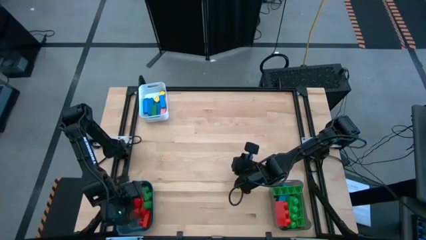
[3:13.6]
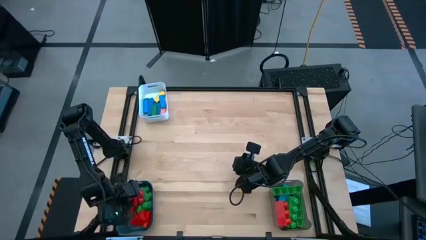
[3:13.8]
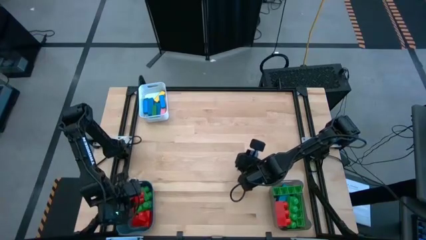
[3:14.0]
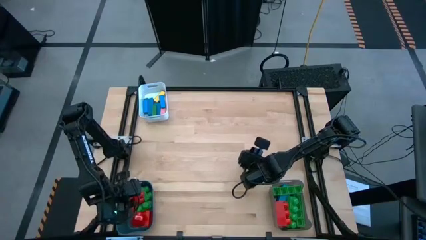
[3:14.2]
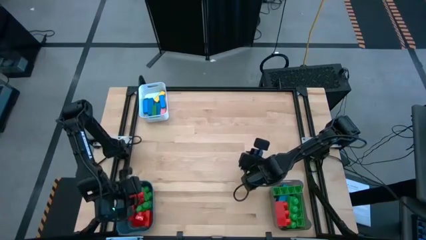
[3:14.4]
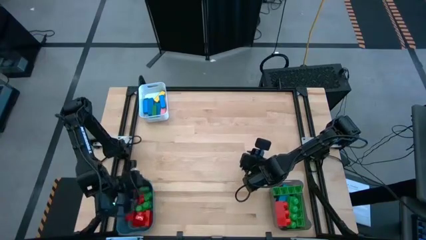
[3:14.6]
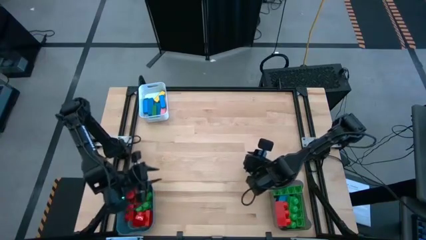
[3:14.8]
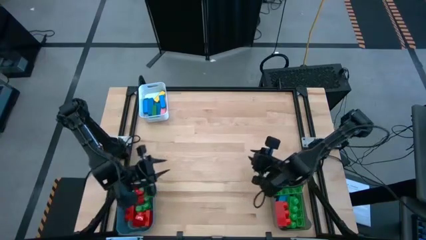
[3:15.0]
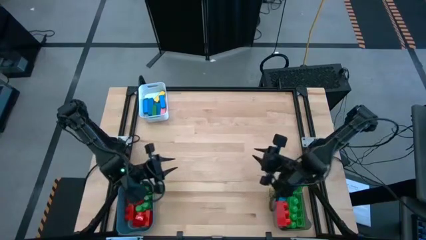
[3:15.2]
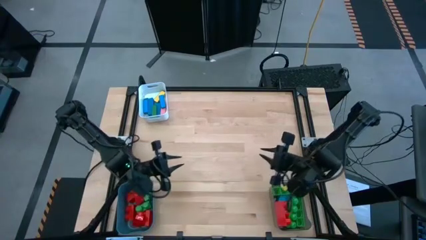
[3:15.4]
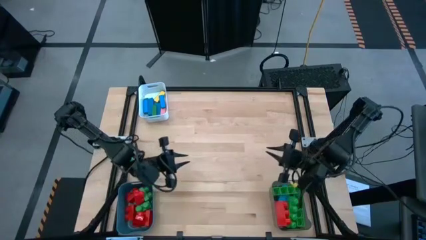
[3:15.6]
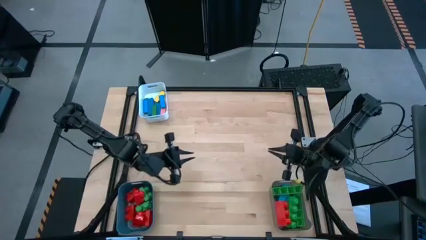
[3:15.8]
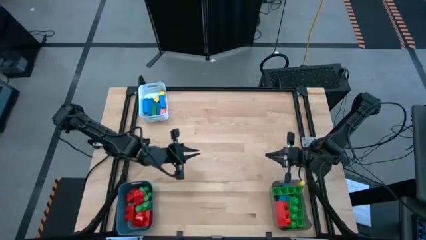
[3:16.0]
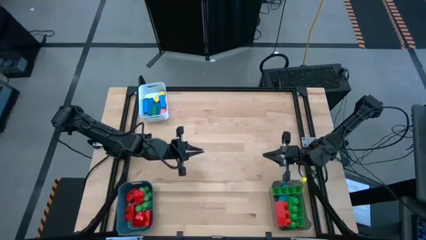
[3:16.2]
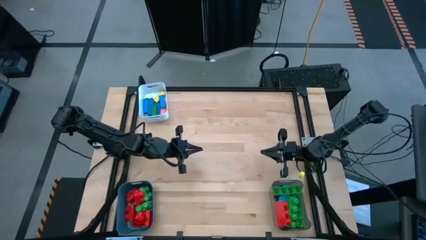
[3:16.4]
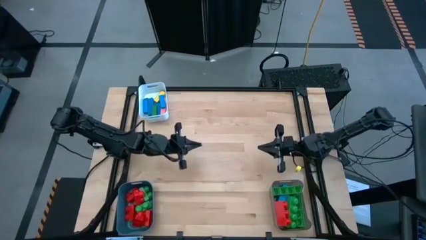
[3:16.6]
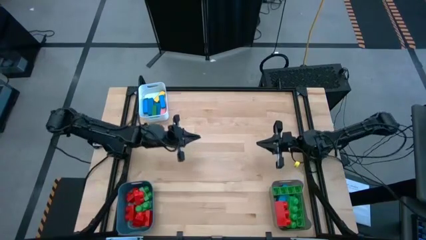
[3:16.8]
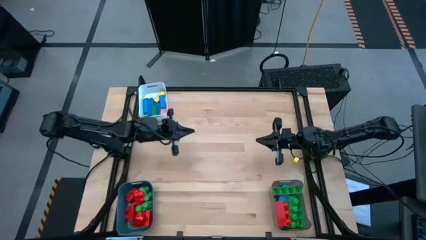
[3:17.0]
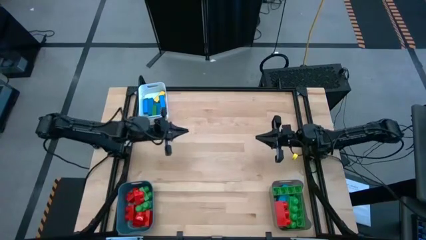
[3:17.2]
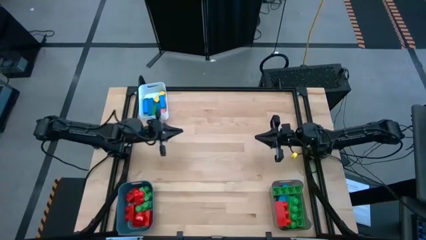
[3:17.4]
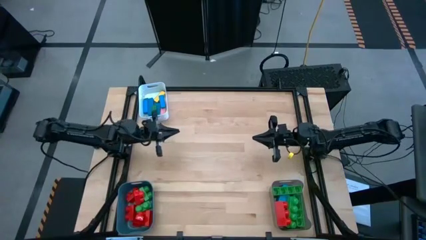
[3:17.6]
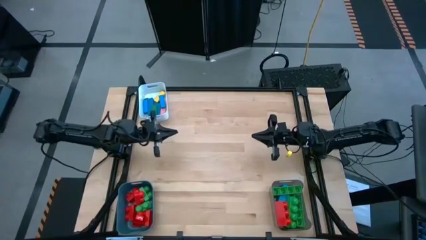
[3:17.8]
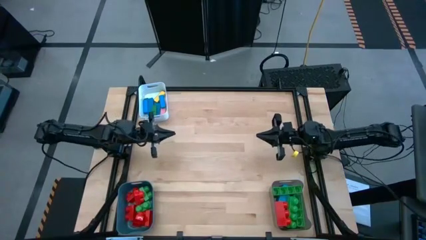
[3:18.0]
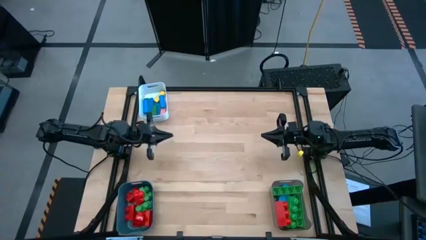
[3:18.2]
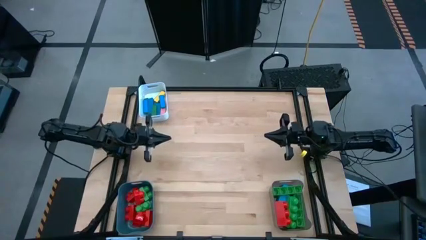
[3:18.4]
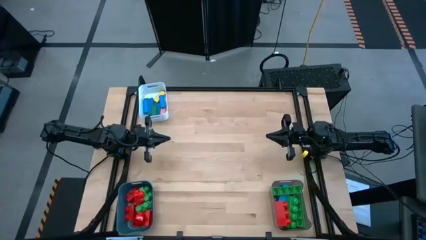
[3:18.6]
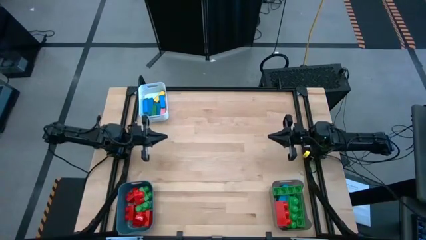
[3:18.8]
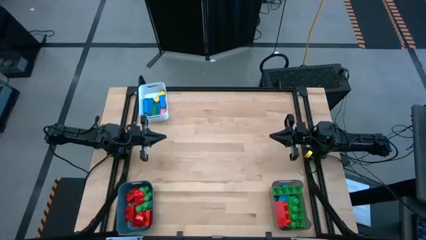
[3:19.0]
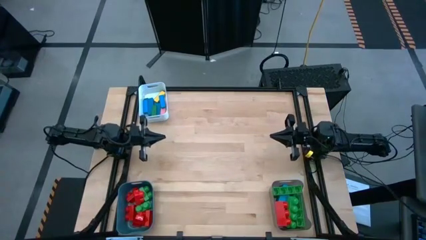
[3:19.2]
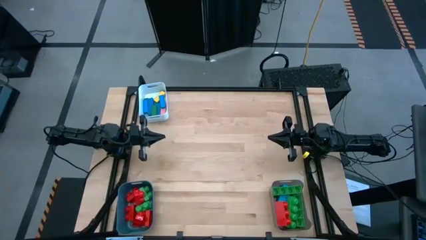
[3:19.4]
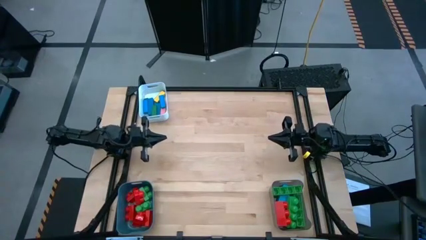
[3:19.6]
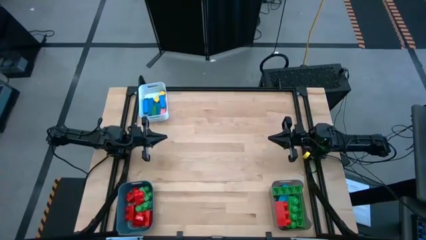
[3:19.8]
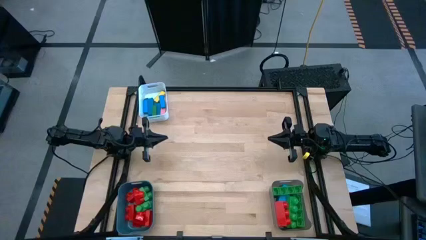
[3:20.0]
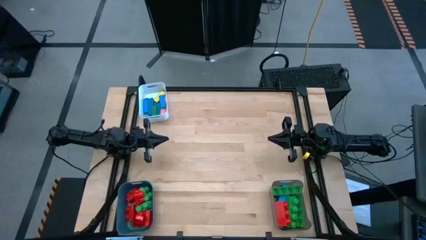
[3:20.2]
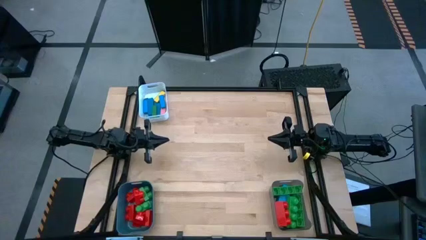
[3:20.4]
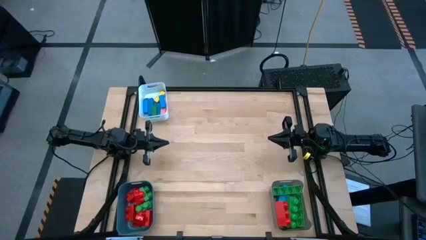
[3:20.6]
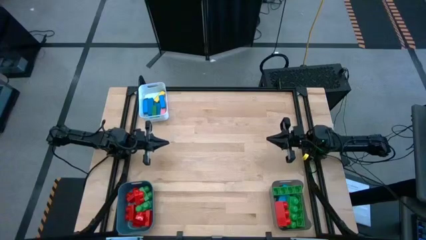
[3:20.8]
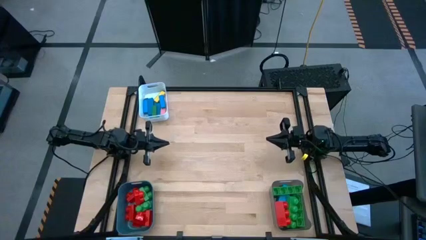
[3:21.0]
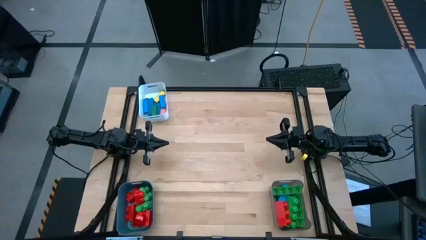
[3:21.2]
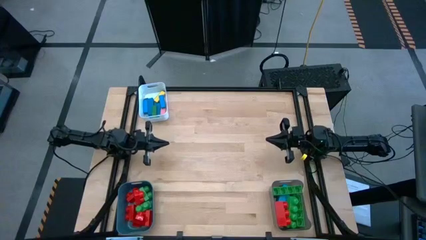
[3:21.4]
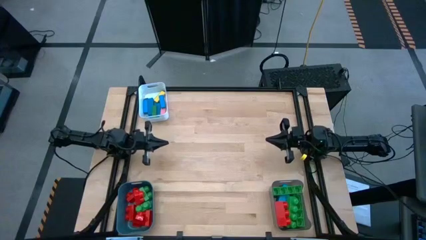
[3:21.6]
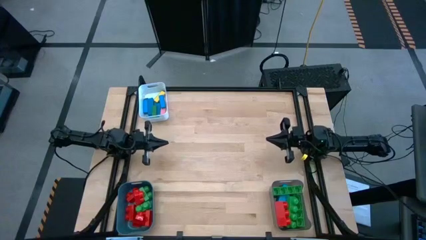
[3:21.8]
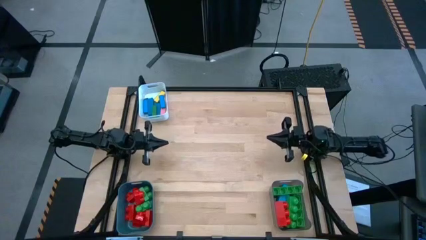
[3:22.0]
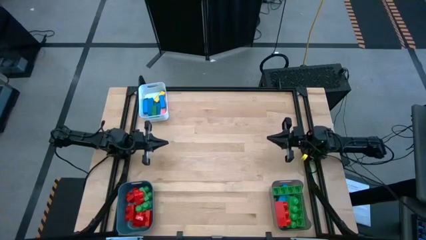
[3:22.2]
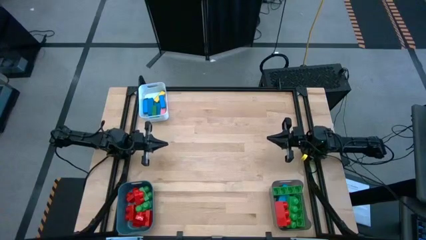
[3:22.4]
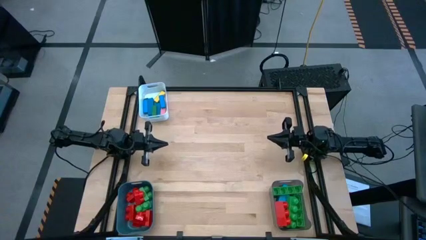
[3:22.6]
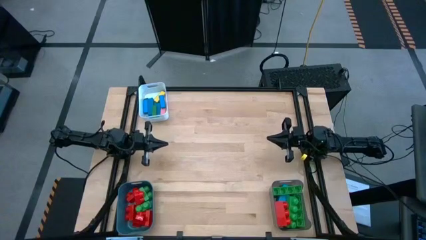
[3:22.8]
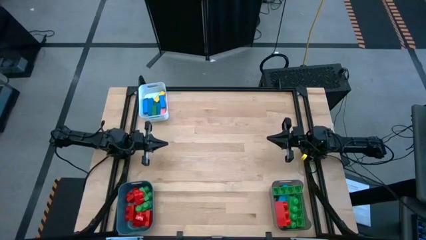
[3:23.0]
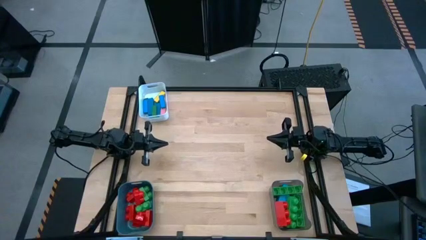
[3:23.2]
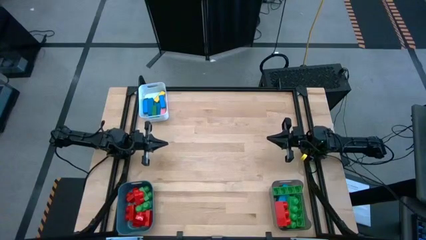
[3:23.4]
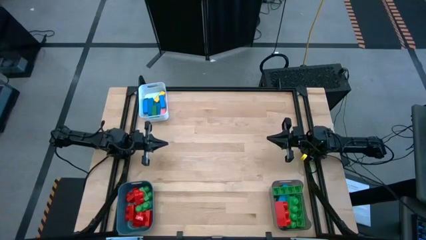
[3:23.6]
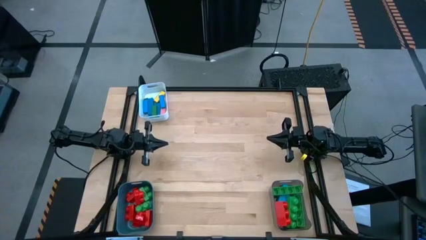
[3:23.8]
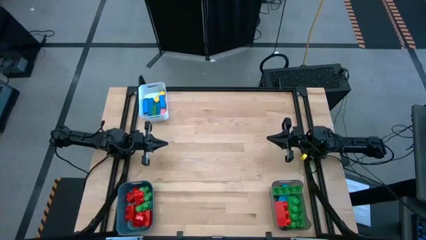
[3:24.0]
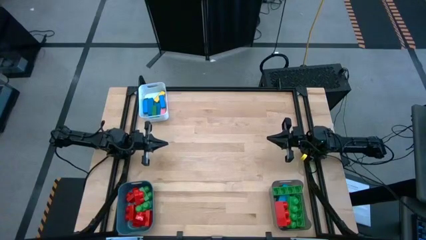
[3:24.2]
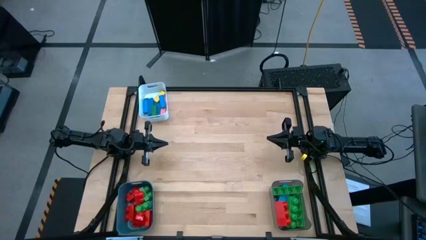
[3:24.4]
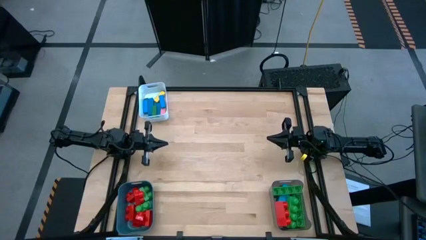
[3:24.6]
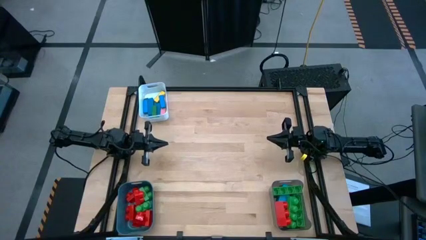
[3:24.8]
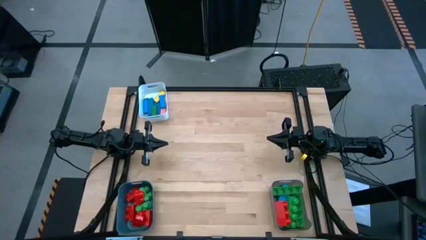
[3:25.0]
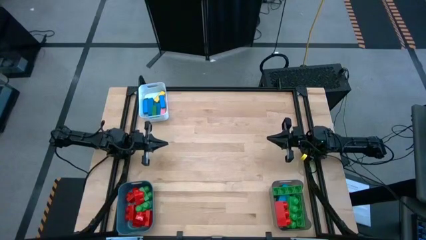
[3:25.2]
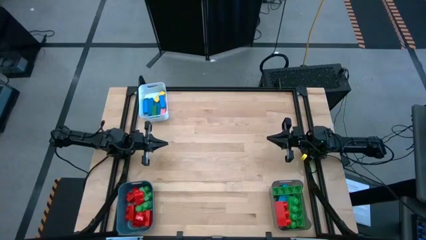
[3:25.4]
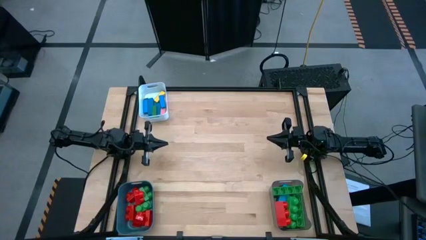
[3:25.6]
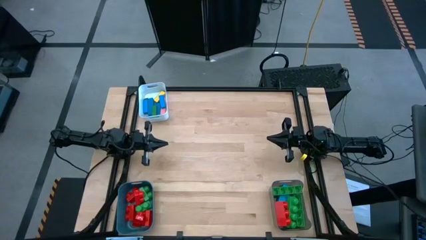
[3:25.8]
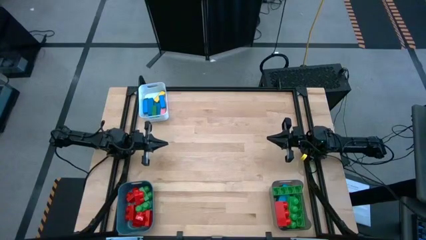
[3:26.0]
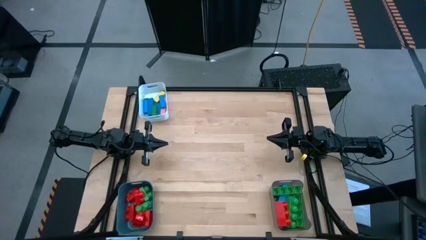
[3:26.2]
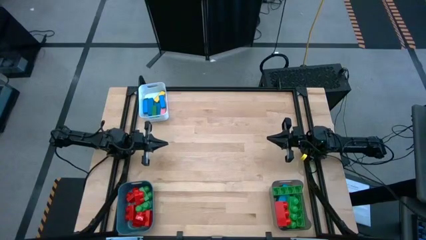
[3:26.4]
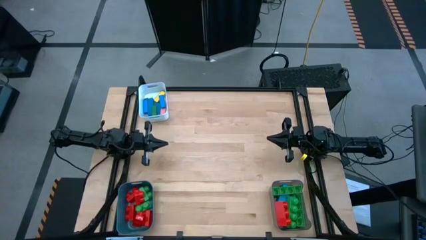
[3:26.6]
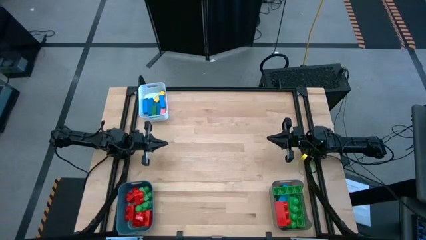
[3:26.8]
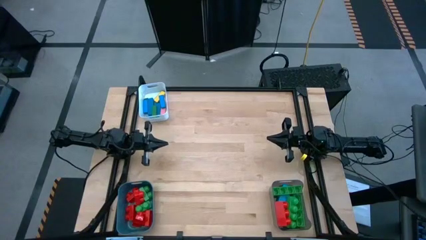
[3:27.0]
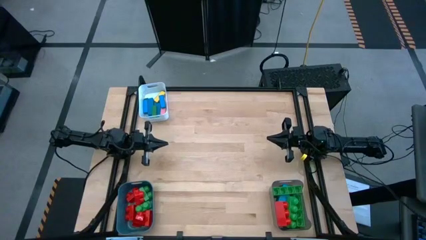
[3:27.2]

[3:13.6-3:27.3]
Task: Sort blocks by size
Return to Home Position
